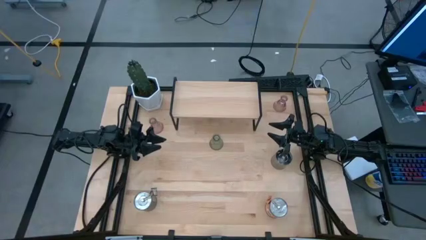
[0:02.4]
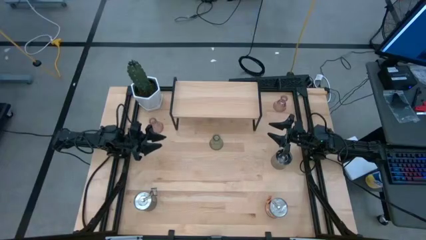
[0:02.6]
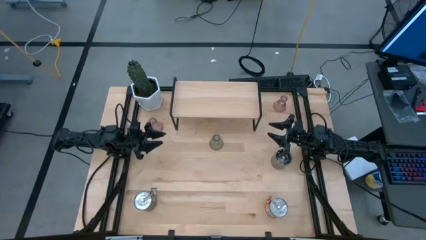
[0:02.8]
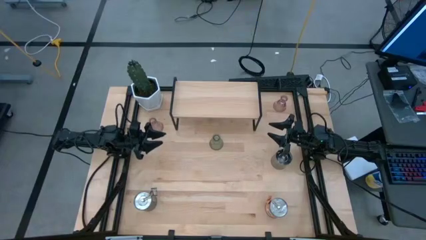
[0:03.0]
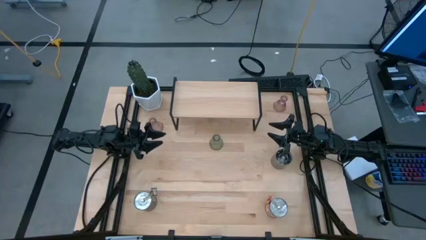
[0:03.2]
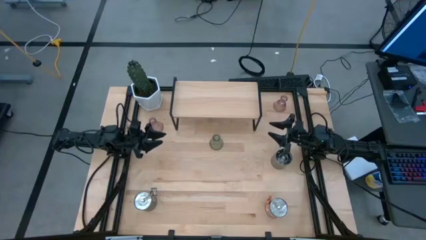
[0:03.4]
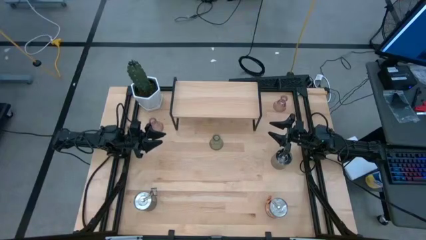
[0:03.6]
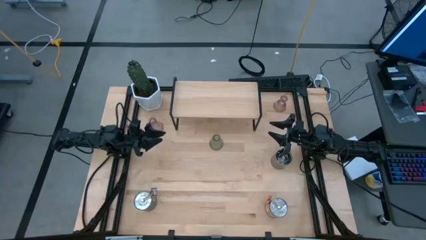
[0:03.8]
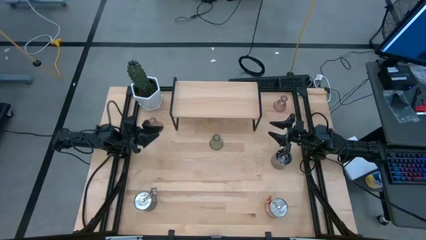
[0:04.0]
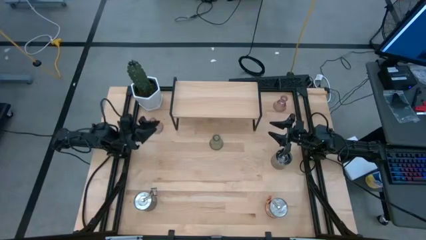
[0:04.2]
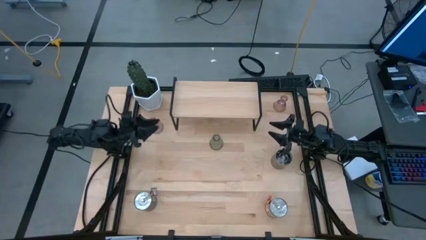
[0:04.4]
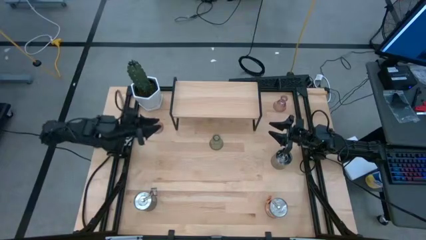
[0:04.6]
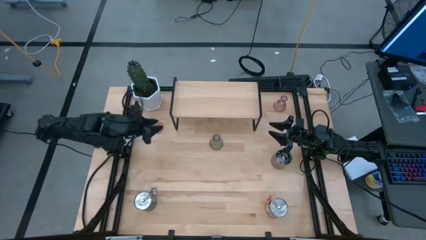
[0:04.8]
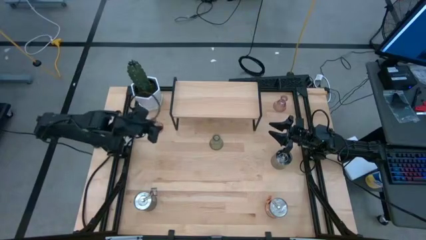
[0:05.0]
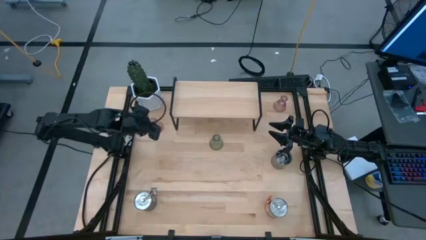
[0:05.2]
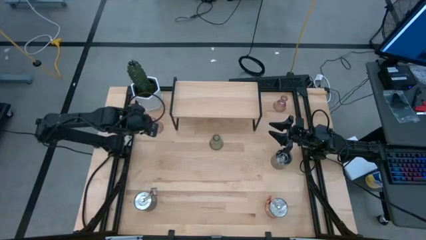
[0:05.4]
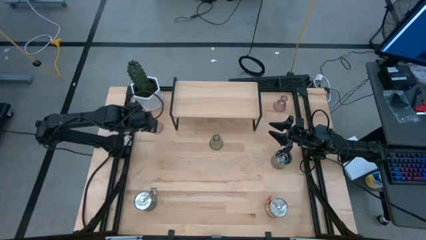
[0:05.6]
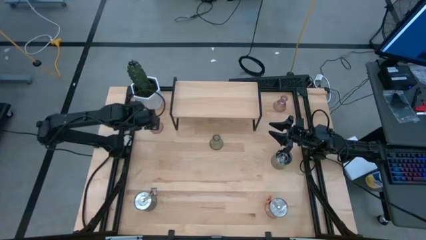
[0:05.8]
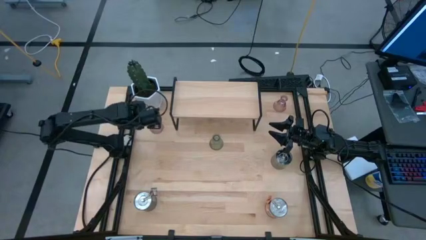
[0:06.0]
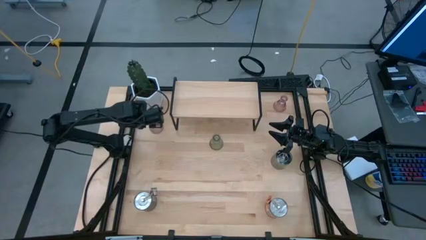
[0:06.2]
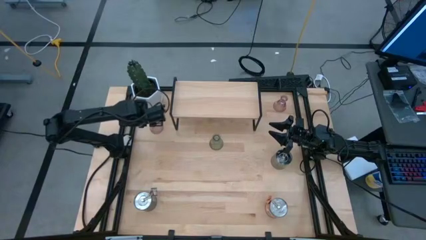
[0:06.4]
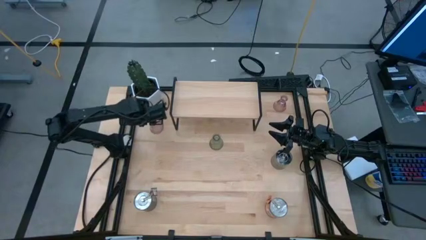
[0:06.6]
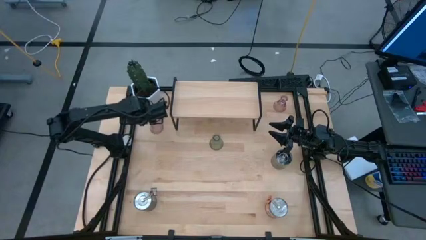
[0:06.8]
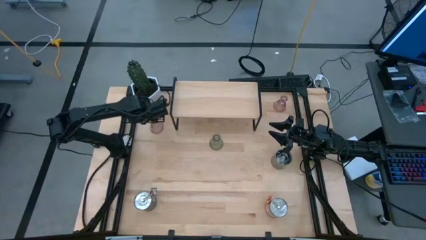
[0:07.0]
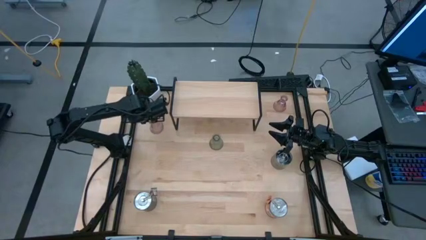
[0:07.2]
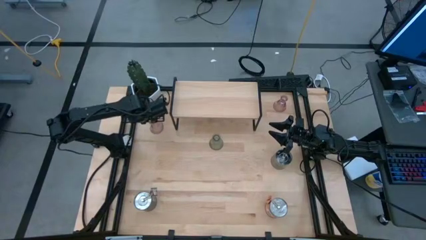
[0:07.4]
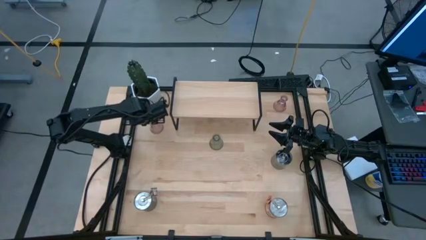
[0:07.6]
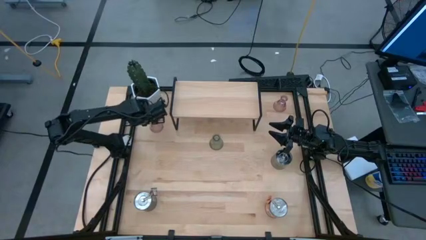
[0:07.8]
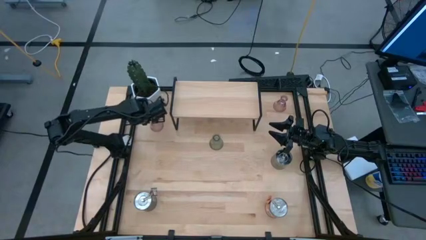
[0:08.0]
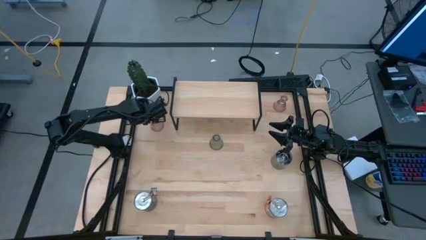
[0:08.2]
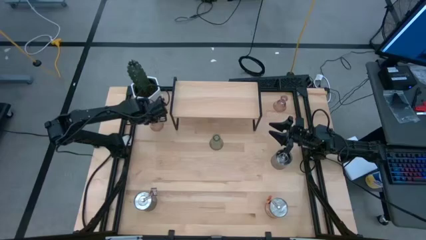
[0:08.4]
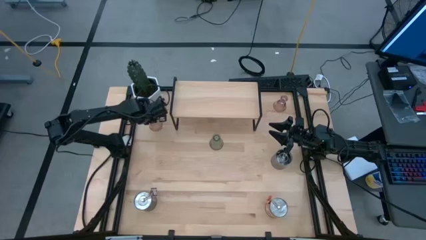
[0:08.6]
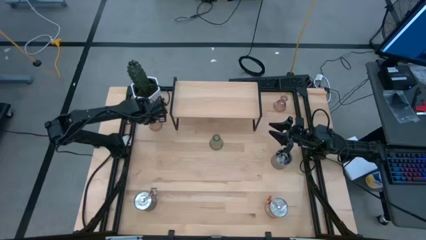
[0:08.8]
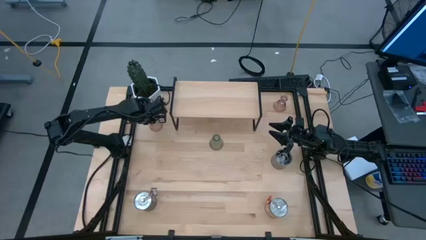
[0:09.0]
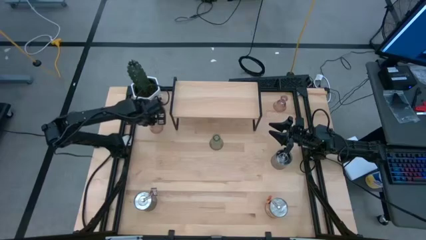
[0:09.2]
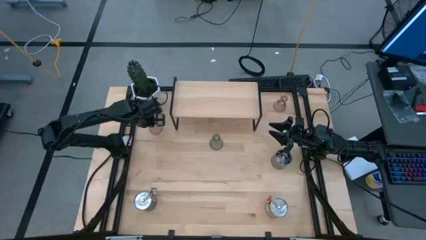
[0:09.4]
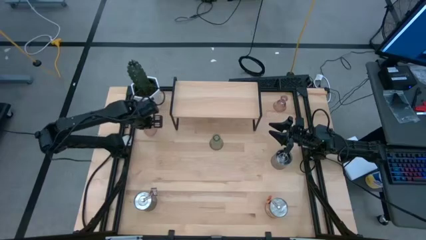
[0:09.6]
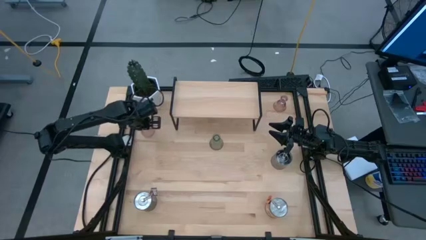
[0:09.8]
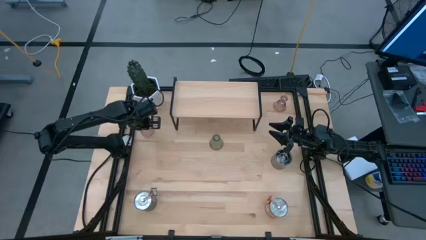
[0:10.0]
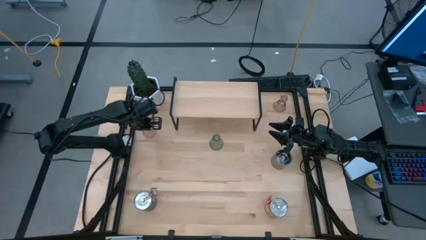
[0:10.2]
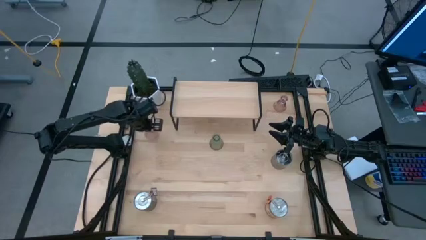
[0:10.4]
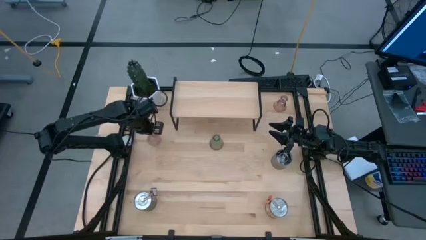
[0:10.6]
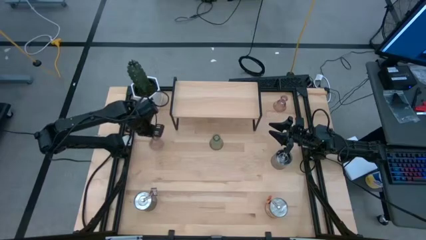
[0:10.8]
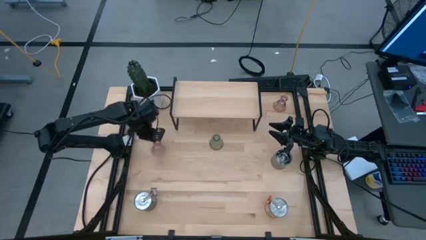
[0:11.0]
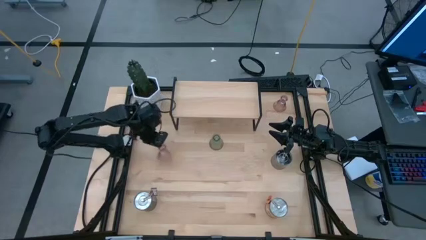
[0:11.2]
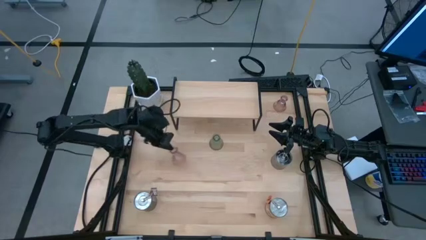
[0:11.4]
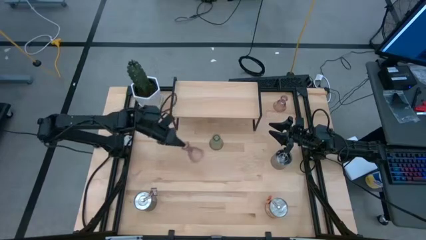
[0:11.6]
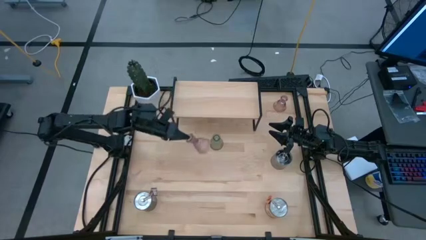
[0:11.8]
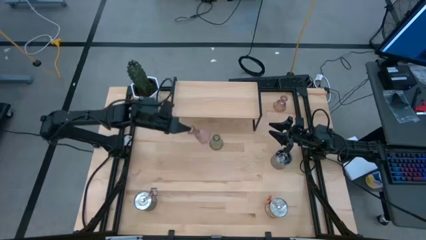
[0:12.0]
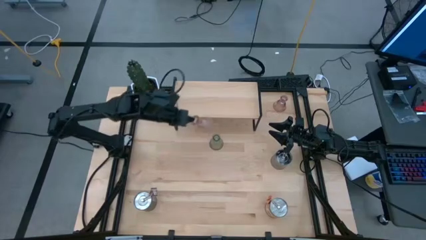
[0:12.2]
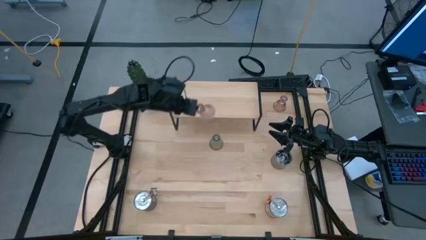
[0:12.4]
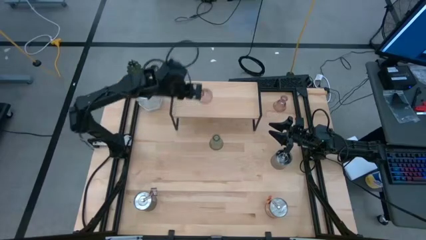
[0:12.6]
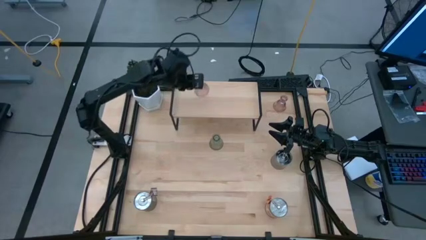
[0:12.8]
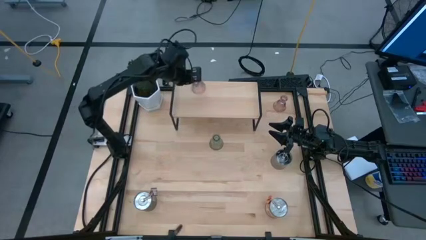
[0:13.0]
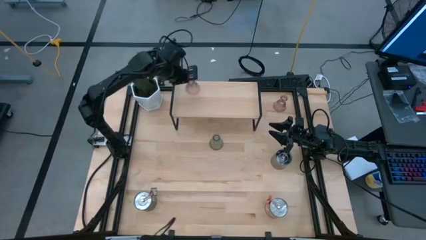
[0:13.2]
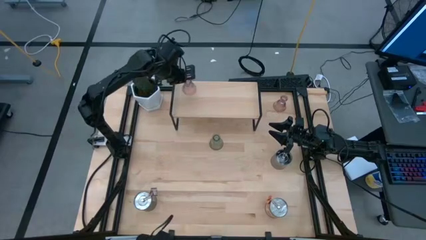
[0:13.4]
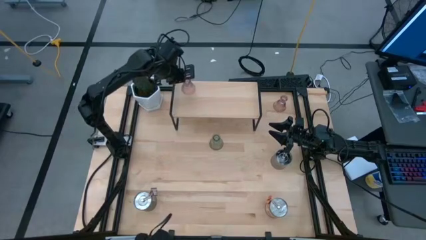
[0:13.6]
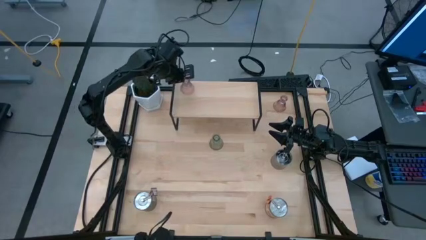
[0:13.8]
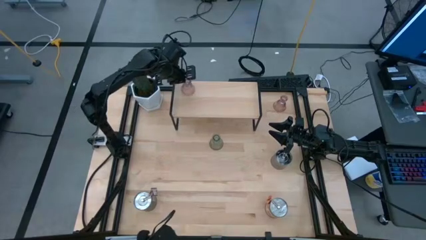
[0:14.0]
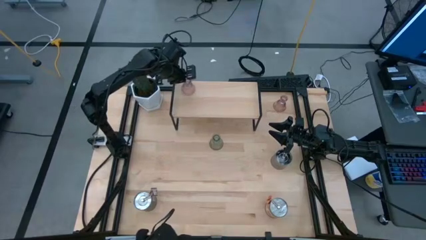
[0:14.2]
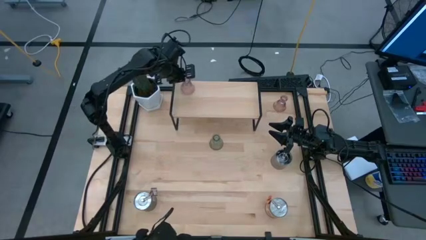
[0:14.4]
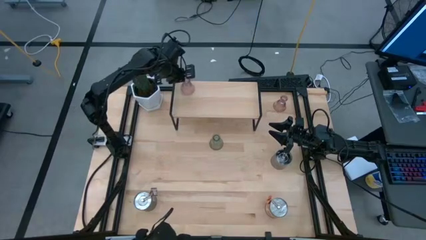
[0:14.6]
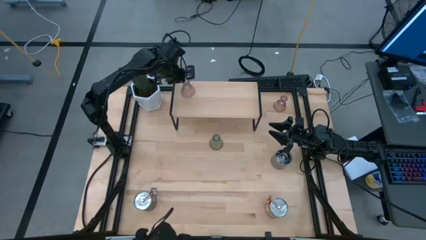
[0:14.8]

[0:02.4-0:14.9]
Task: Pick & Place candle stick holders
Put the bottom pink candle holder on the shelf
